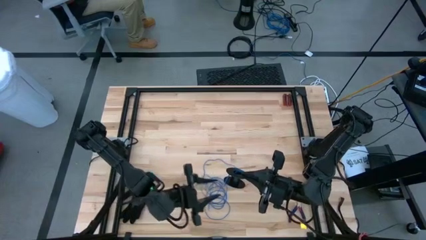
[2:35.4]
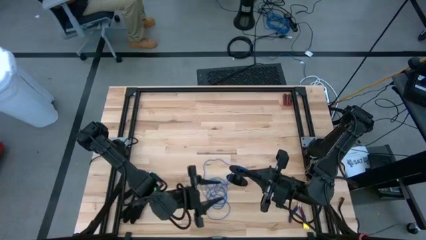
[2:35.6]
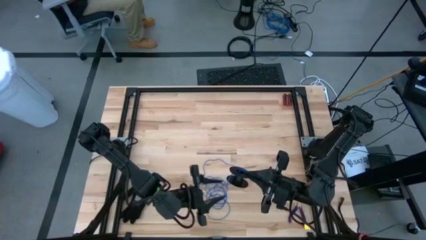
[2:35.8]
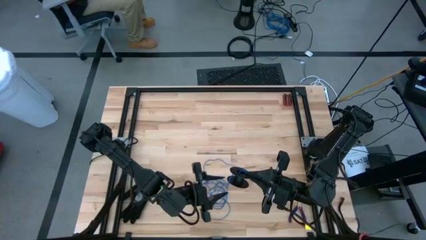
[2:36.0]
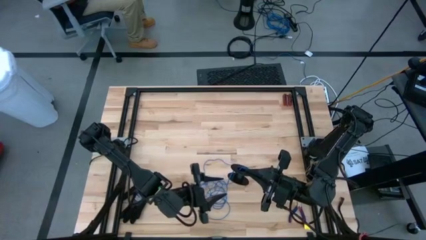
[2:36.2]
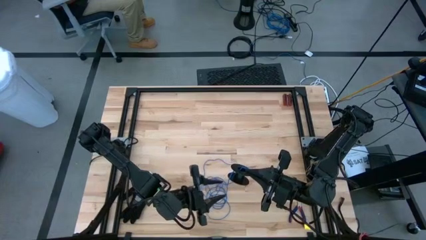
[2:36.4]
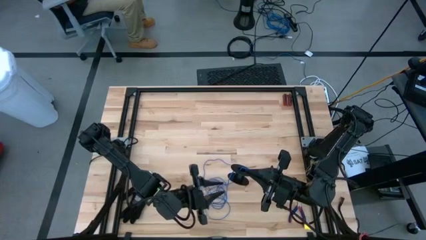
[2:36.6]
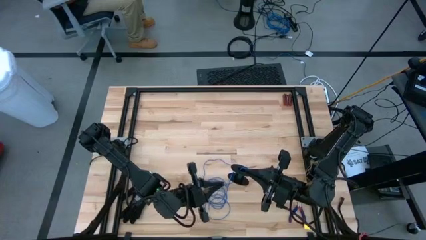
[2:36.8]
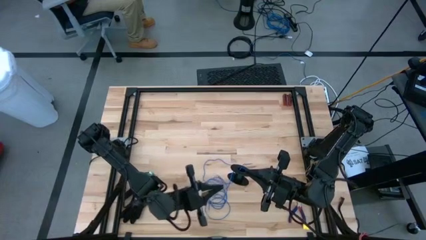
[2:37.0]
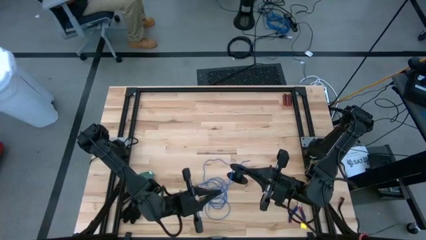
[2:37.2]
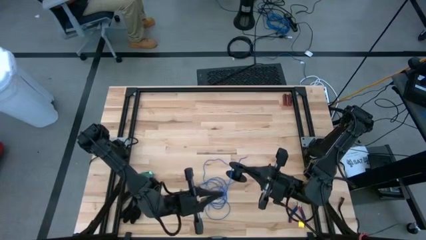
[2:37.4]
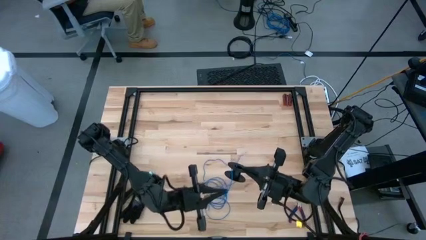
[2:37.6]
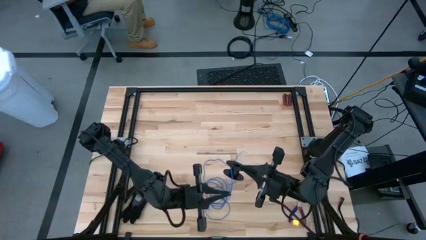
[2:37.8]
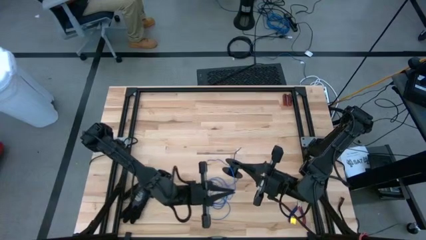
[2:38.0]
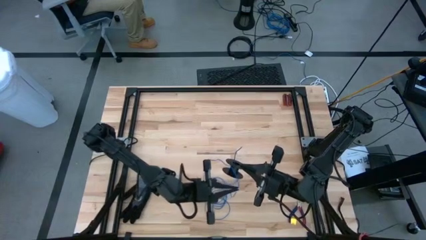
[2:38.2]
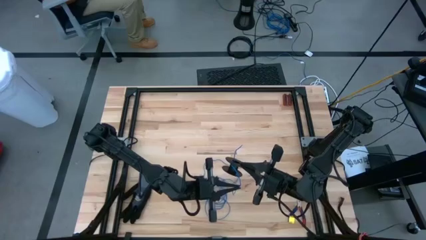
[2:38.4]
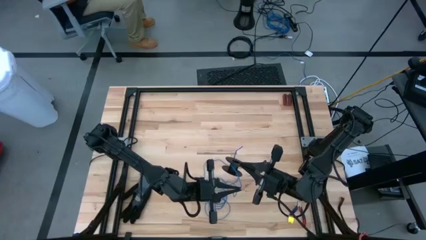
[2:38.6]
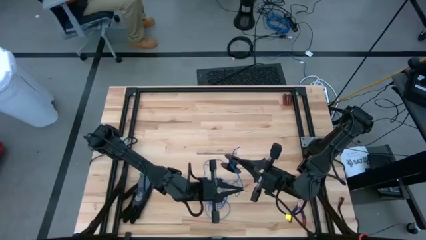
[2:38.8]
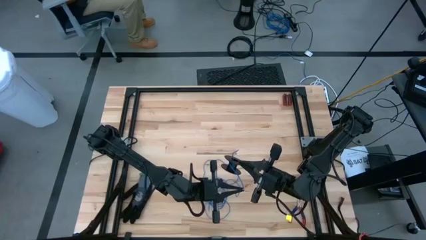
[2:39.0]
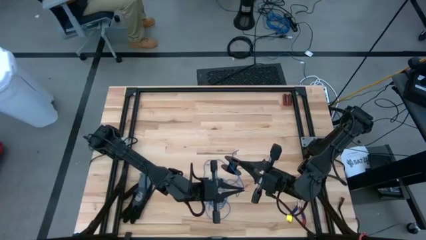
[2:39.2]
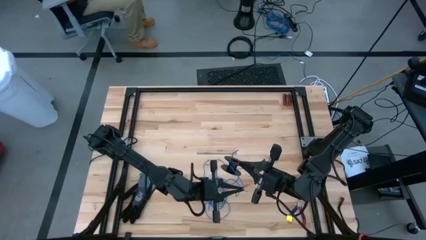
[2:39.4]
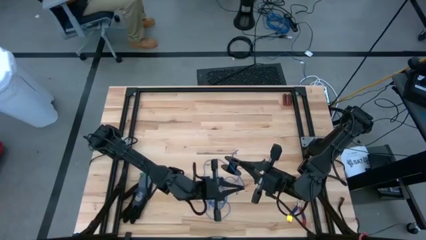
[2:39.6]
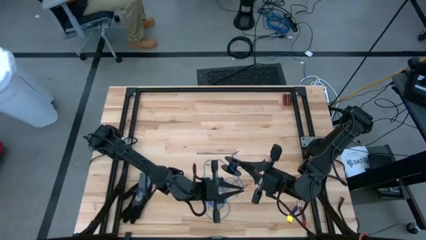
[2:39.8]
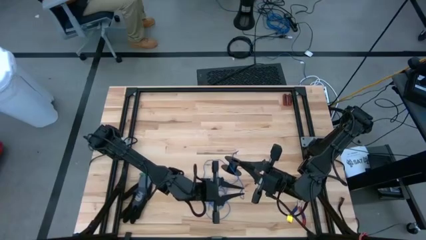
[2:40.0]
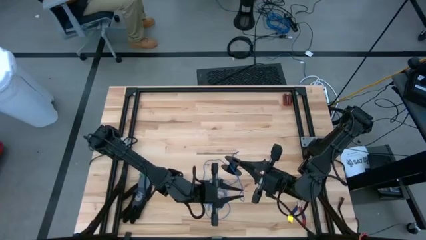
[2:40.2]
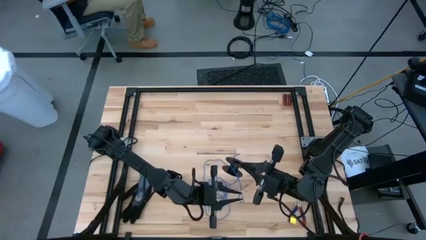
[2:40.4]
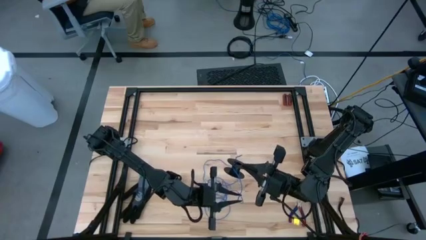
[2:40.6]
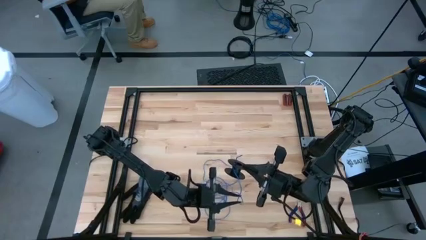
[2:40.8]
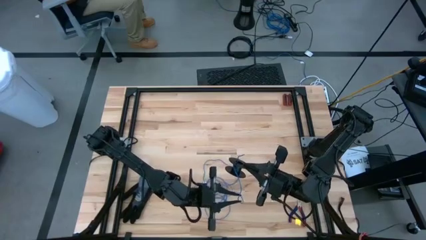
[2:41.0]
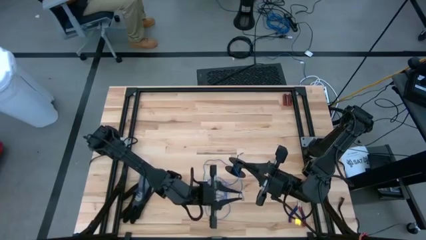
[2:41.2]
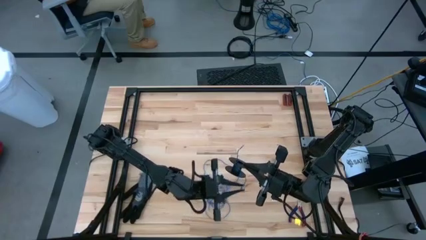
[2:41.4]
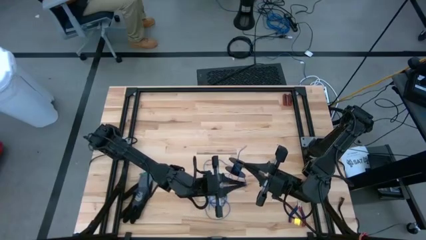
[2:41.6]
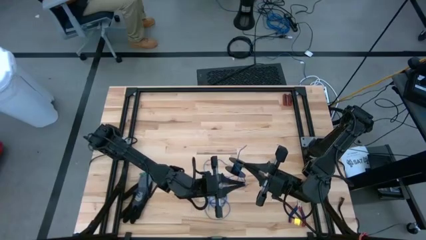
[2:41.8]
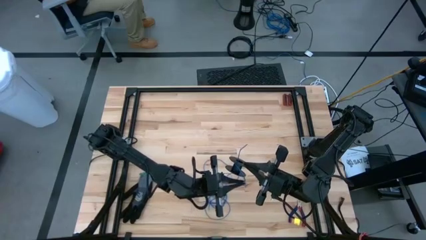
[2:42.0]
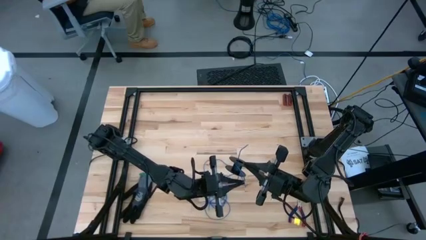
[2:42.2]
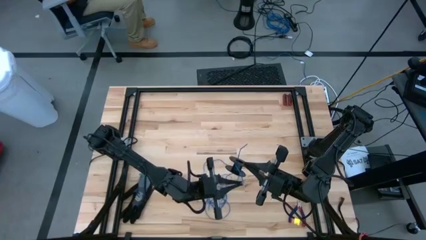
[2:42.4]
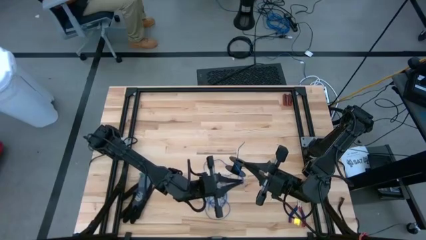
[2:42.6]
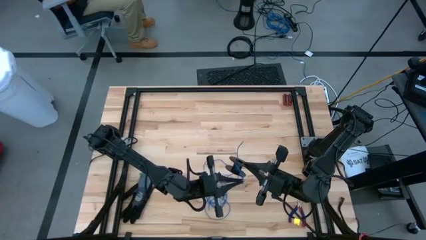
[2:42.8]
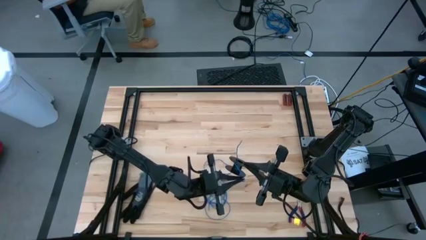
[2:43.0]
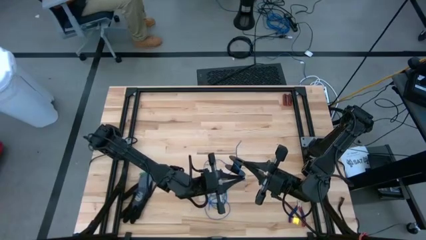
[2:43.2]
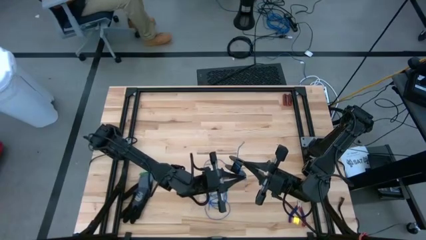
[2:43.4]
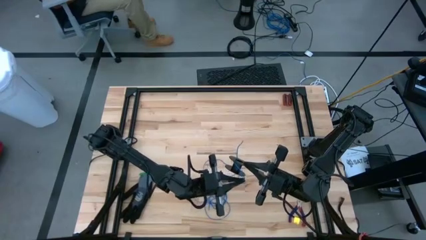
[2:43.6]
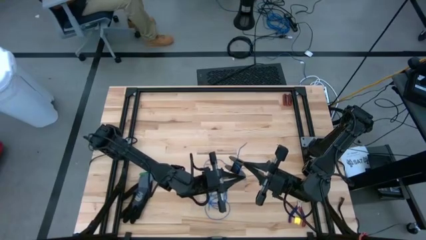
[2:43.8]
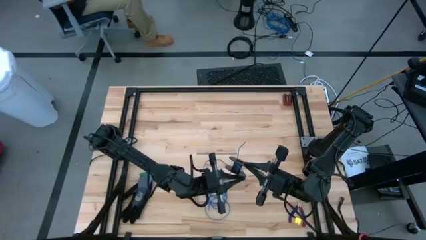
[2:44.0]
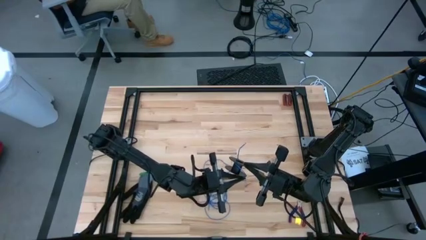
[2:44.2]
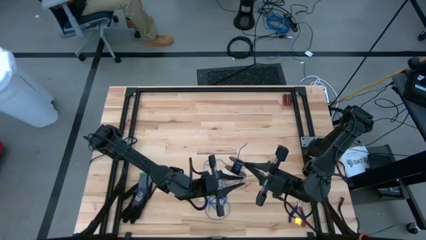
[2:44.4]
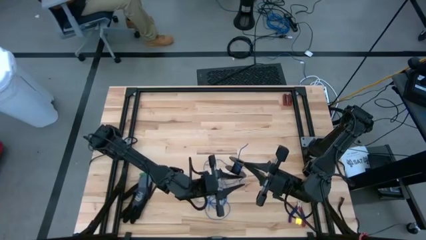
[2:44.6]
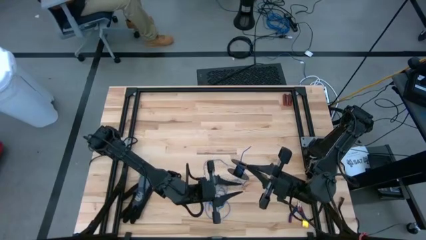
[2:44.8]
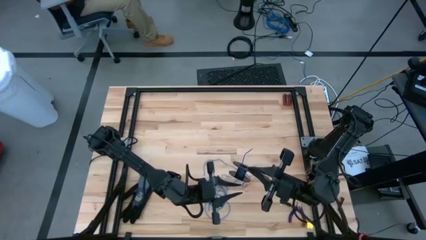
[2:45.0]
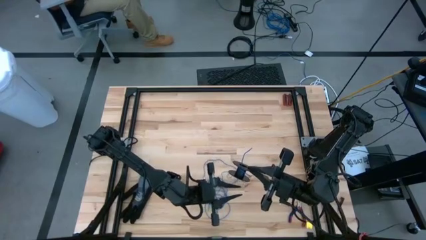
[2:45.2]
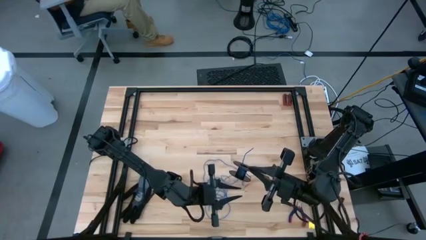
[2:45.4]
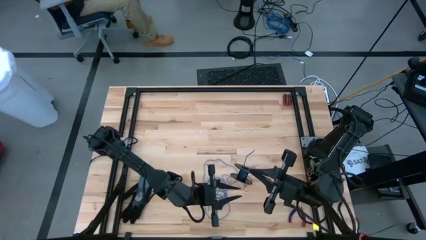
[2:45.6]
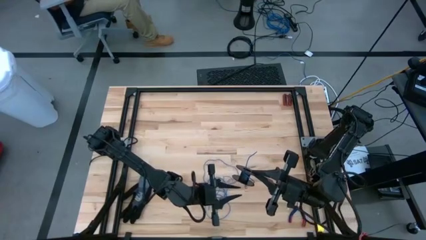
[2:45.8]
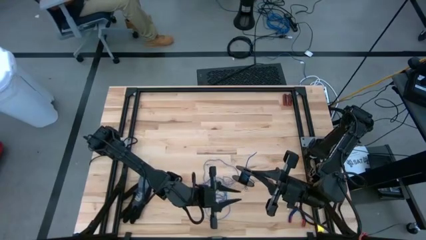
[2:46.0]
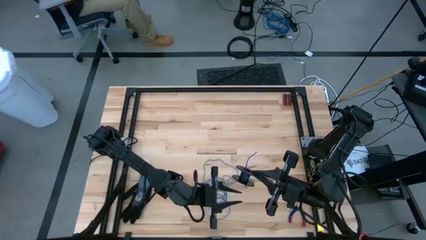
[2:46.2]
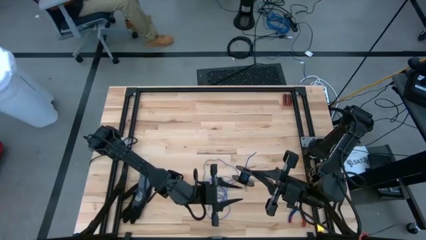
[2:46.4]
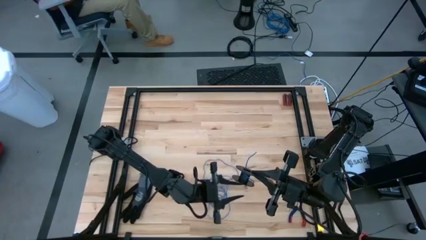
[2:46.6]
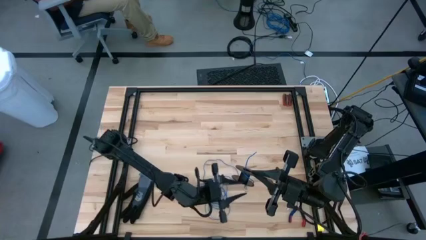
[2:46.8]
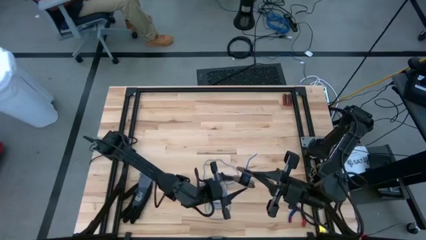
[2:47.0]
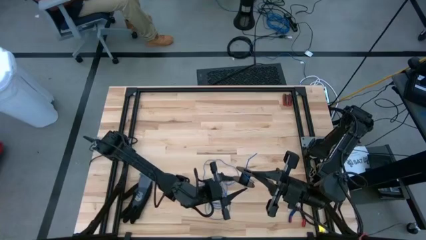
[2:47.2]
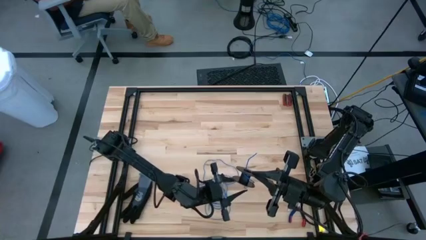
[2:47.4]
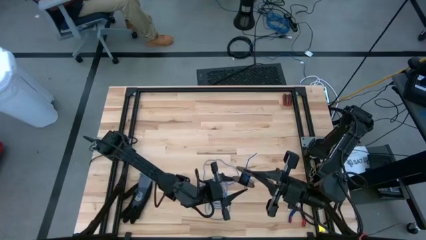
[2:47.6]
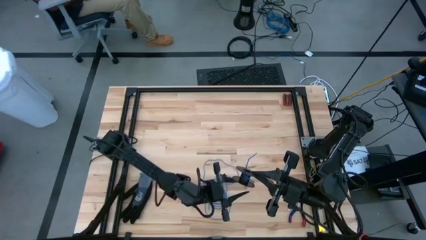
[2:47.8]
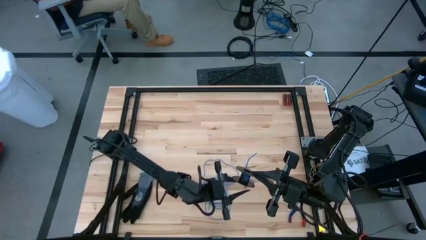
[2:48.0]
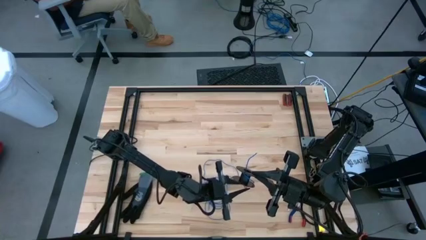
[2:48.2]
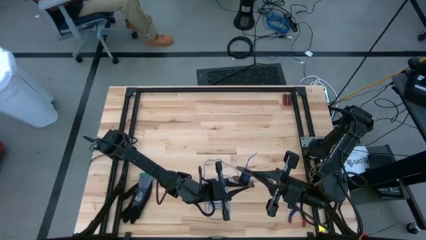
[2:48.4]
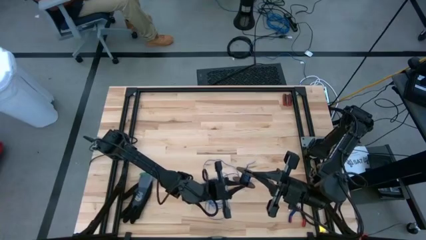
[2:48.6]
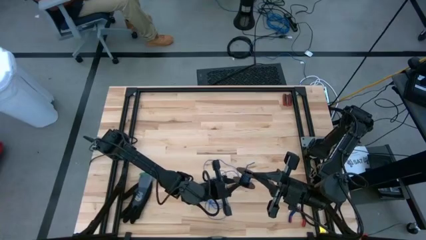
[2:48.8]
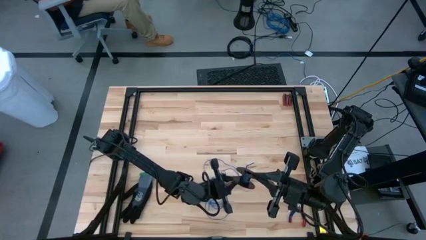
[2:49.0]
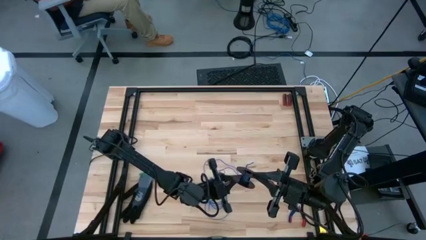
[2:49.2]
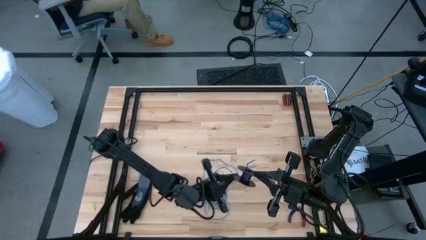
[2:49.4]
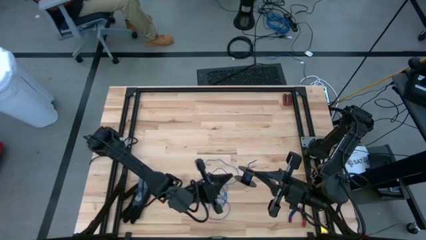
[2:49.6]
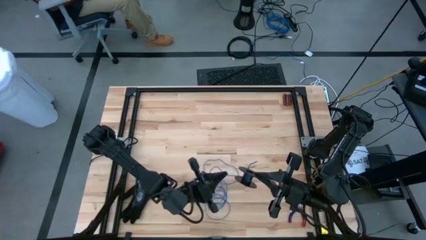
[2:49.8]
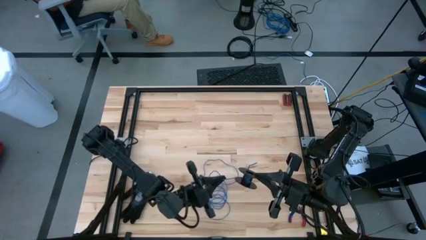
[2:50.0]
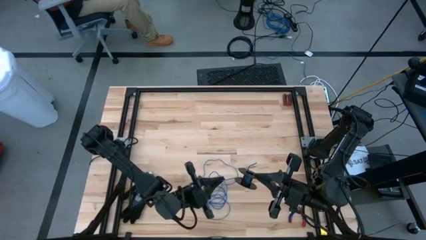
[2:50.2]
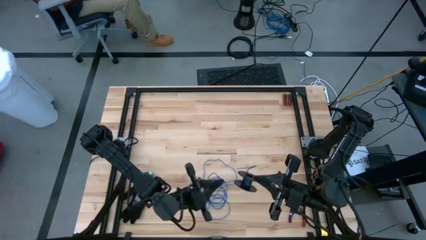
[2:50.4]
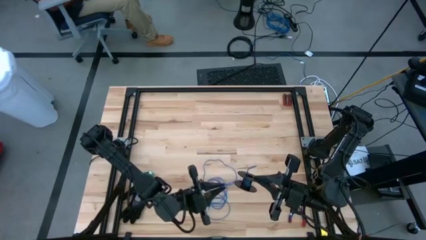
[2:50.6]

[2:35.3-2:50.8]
Task: Coil cords
Coil the blue wire onto the spool

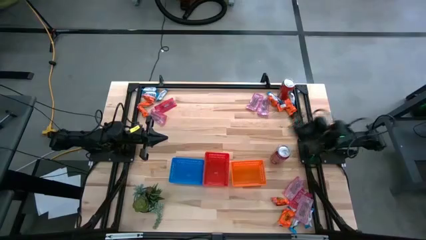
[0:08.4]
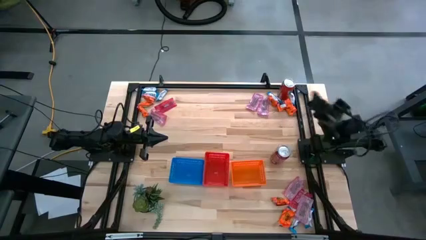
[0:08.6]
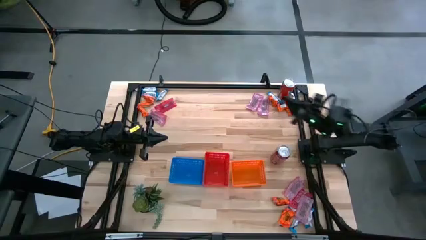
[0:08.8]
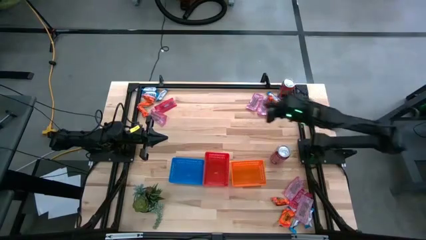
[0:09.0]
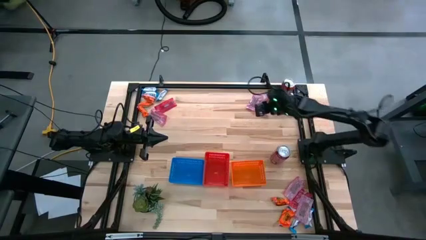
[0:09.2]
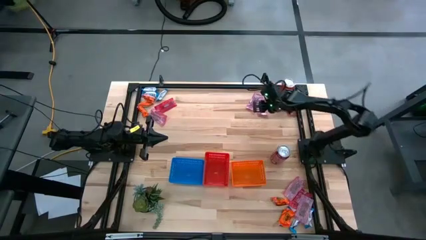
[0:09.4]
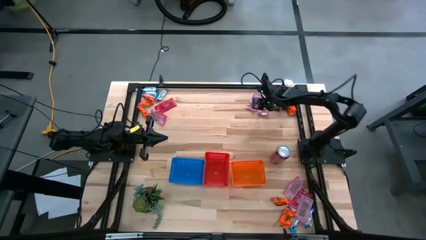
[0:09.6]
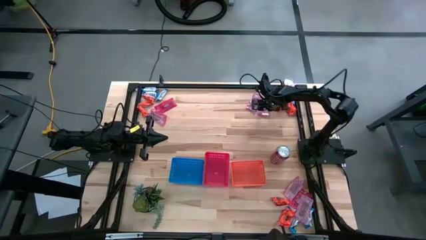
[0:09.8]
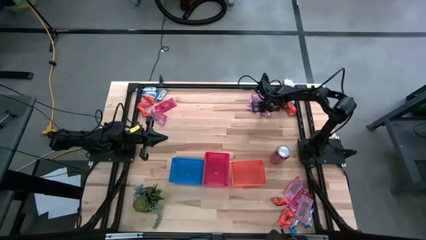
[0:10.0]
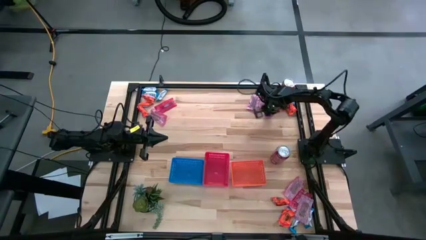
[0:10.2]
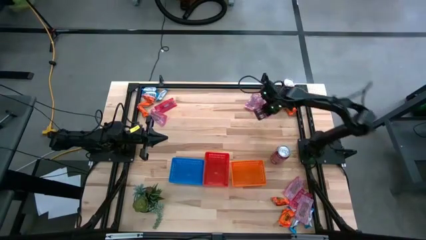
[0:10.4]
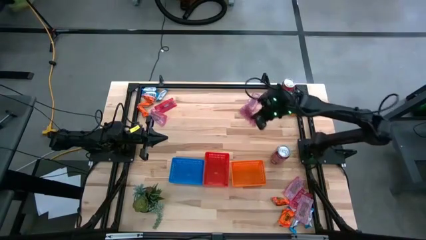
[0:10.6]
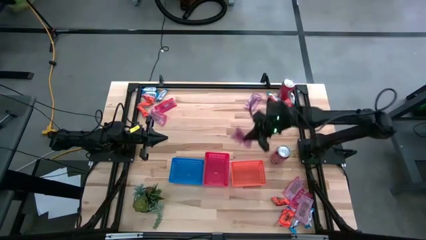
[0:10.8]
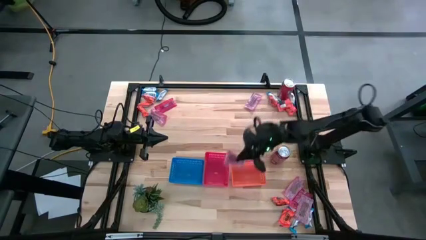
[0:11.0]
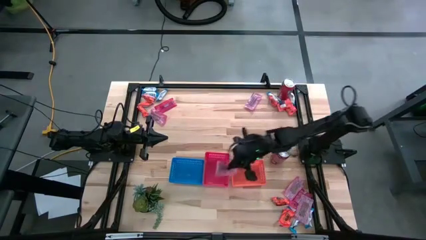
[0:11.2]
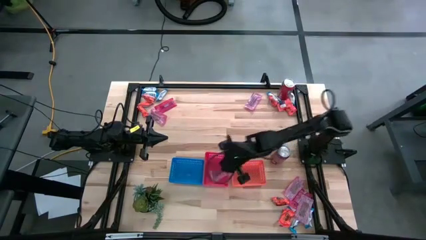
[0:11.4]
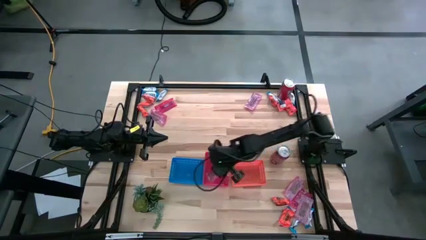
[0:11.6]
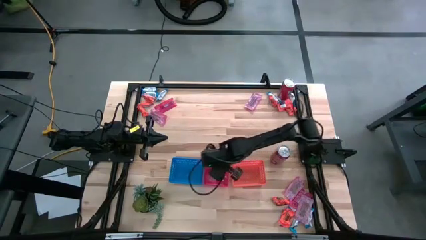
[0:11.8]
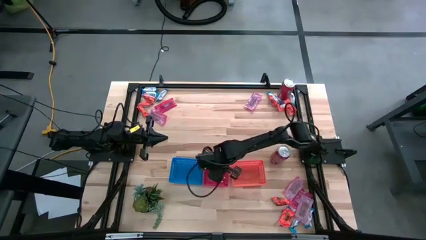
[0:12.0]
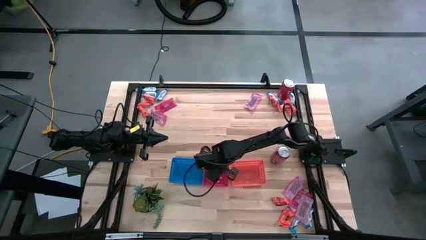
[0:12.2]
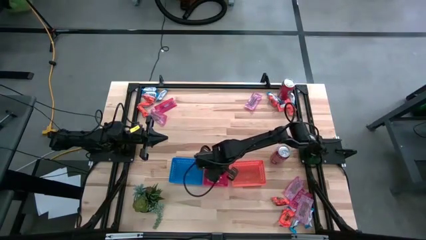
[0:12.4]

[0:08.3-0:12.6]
Task: Sort candy
Put the red candy pack into the red bin
